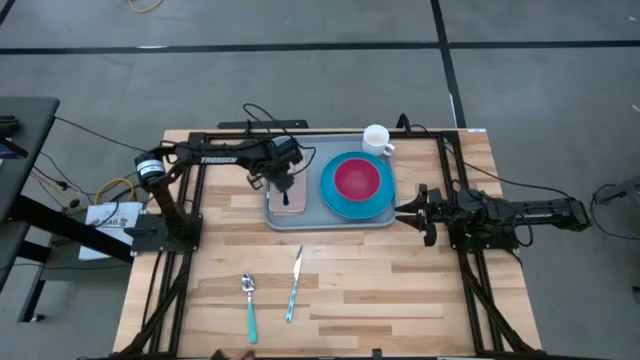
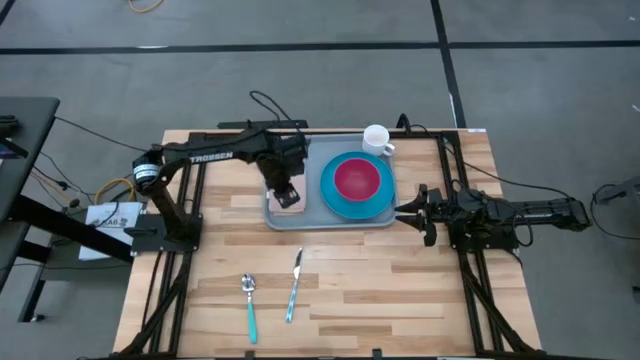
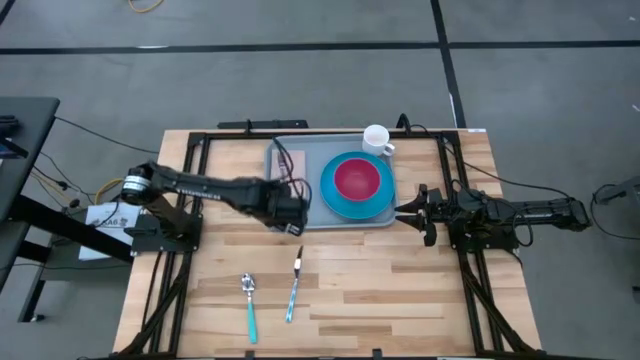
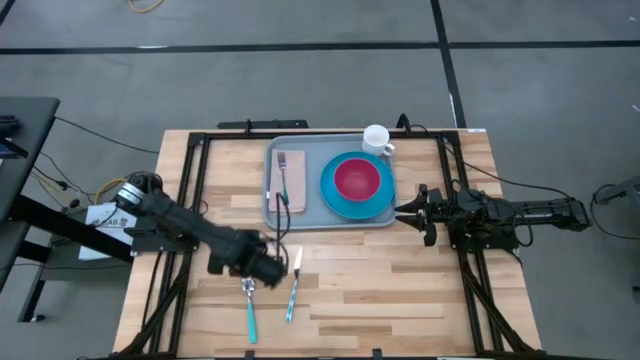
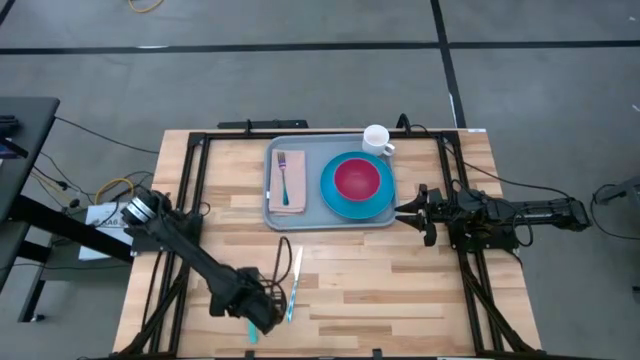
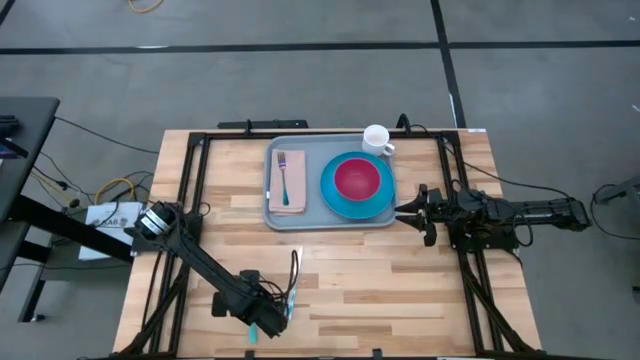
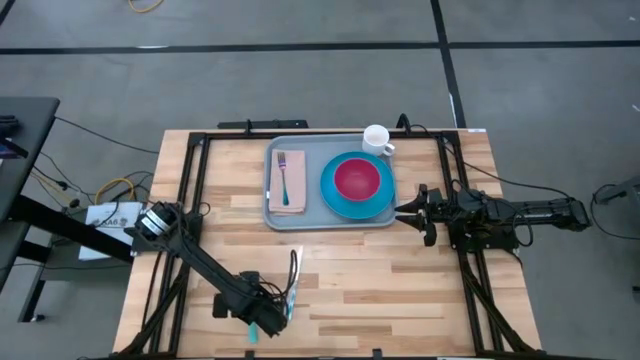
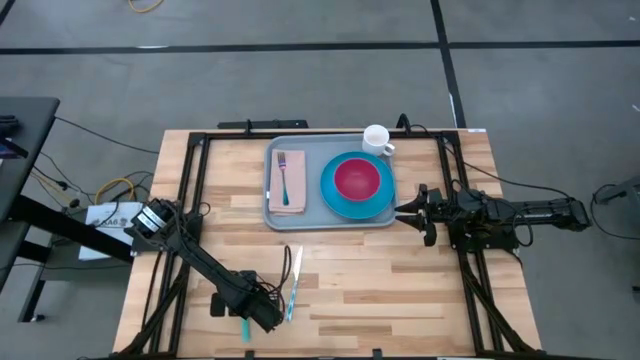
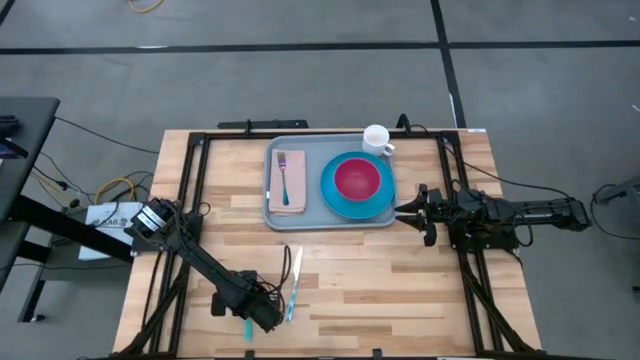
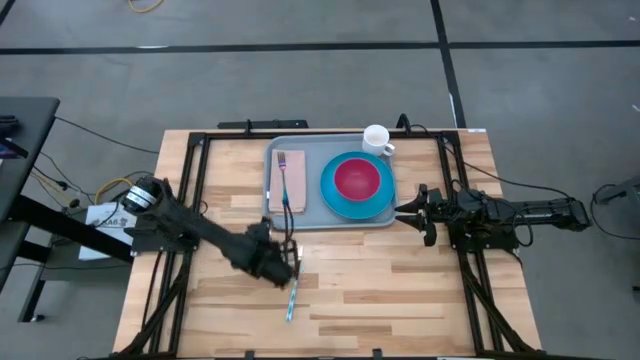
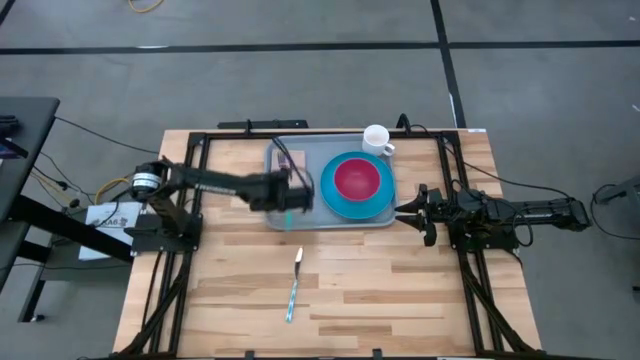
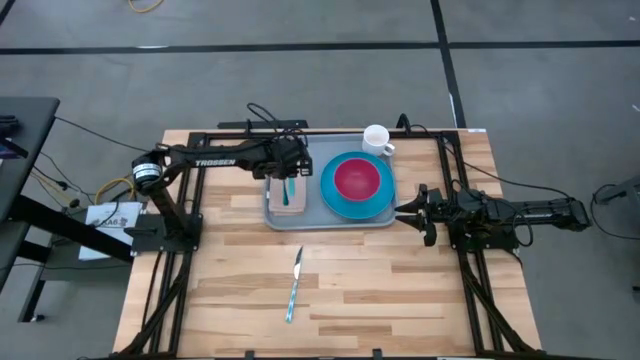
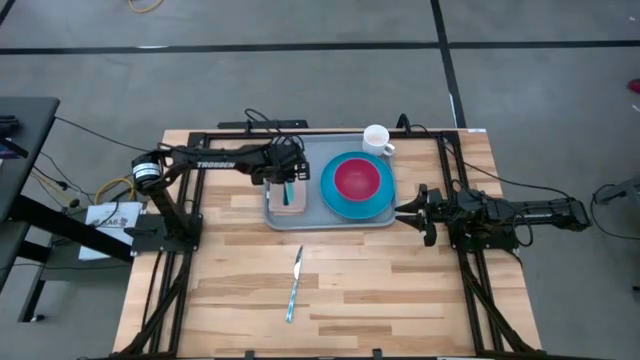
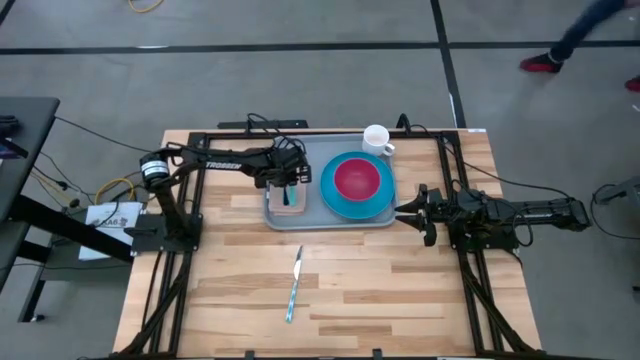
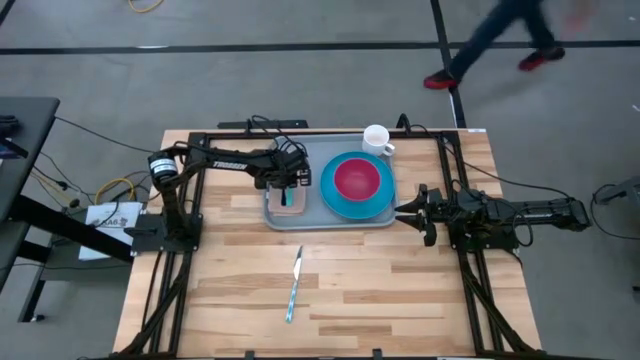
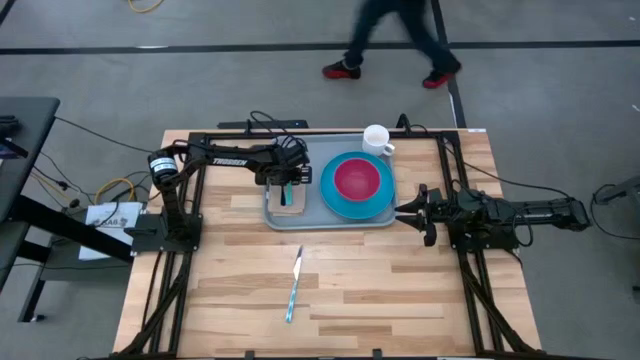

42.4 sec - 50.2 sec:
Task: Set up tray
Put the light green spoon on the light brown napkin

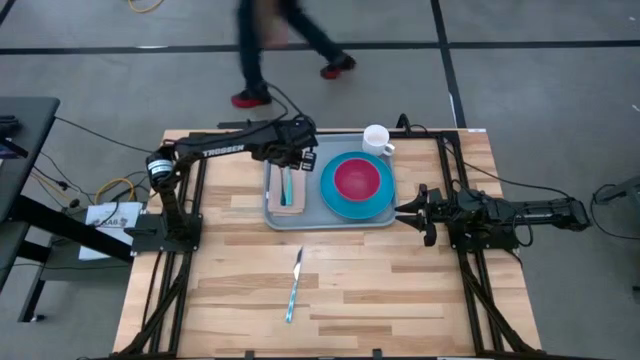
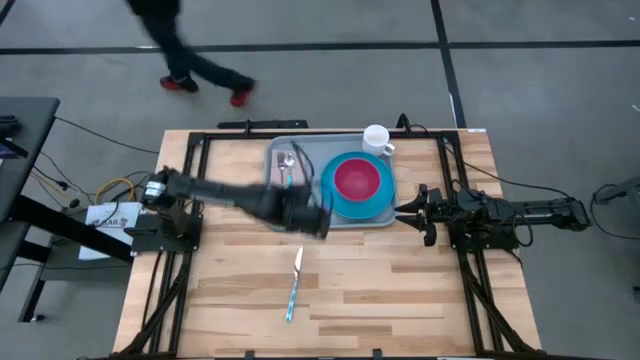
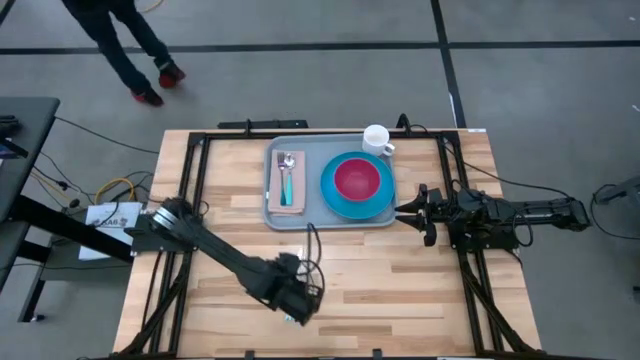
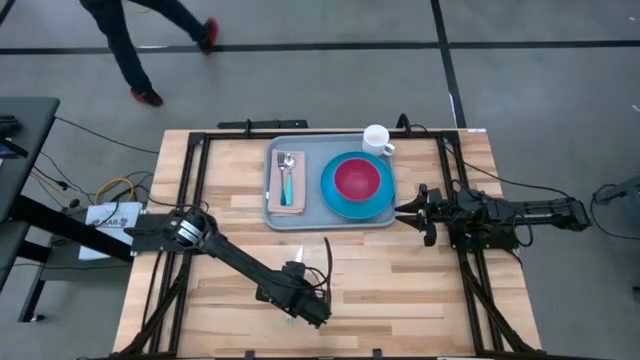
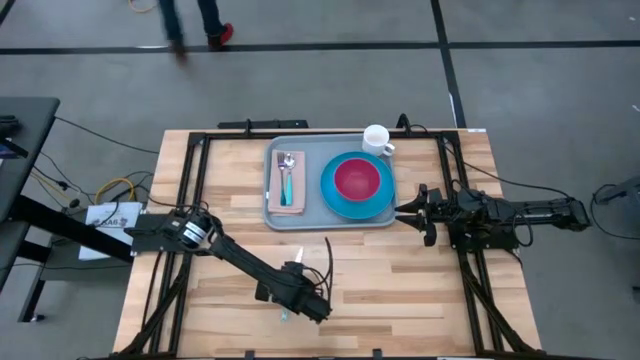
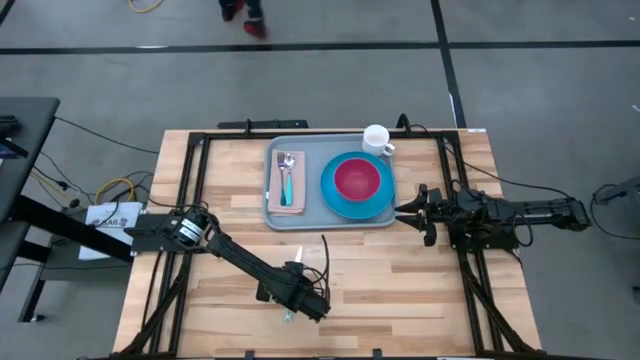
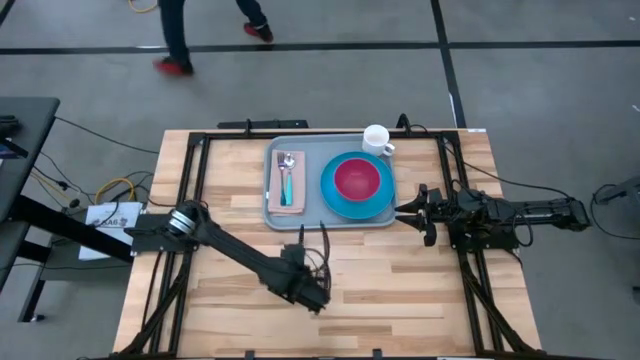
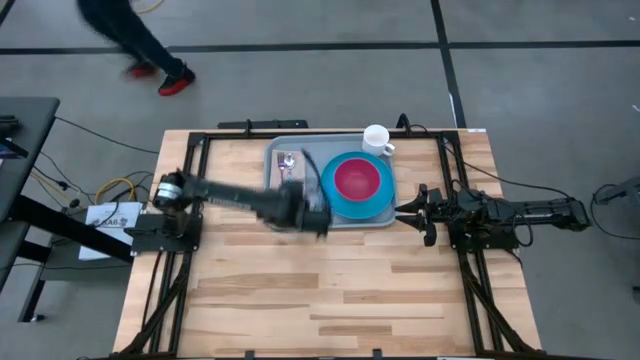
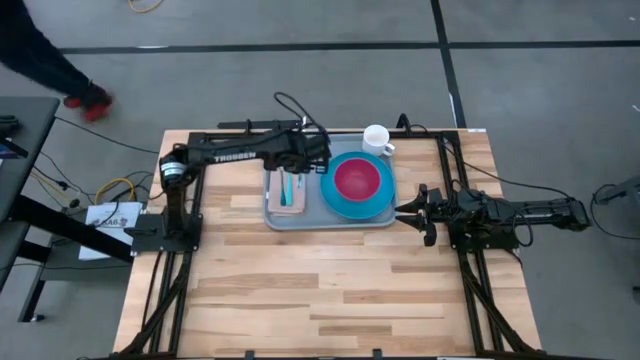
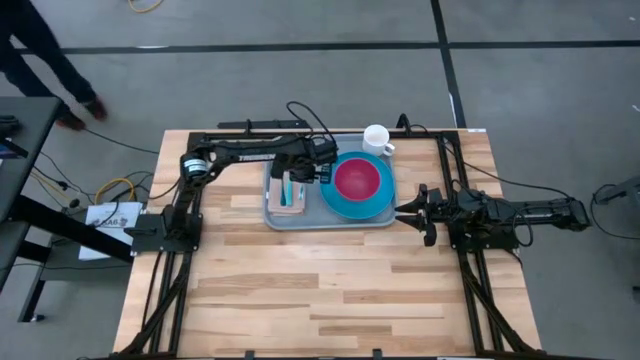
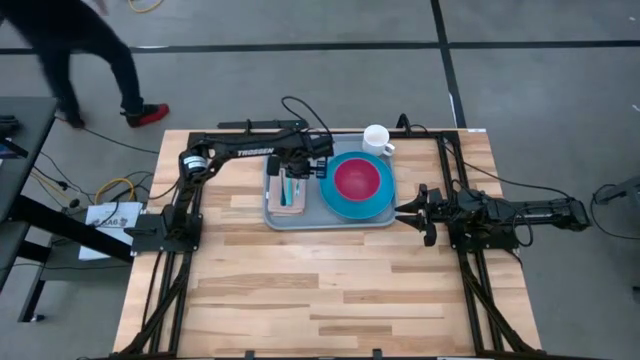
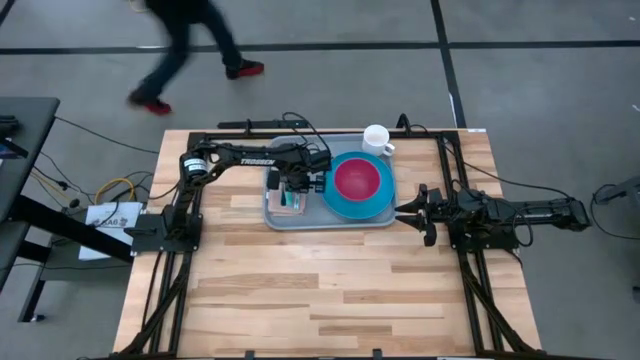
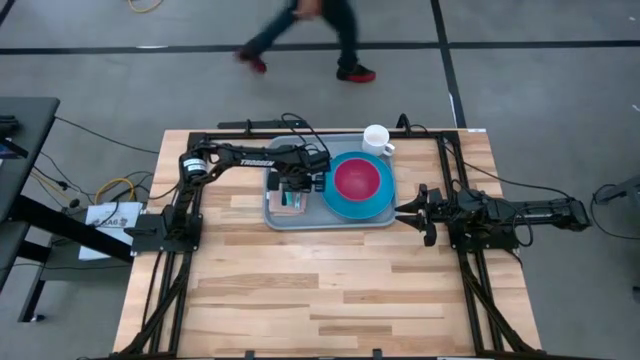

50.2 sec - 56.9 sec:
Put the green knife on the light brown napkin

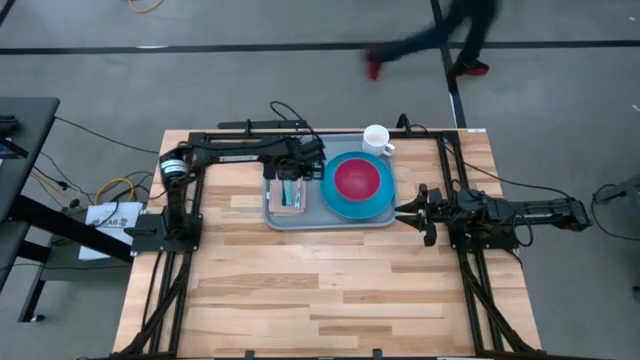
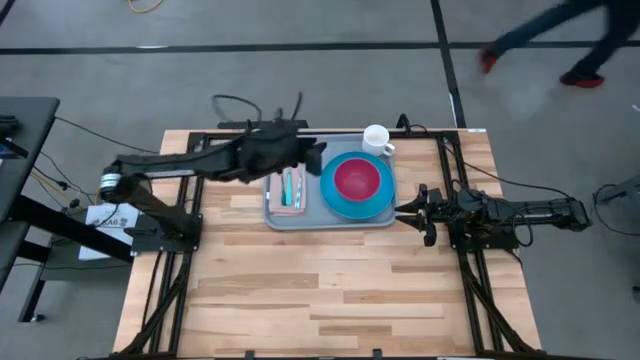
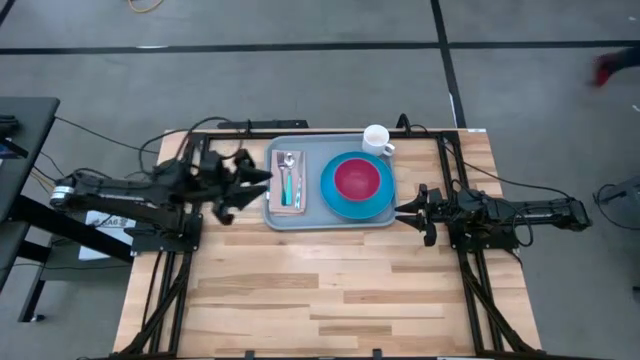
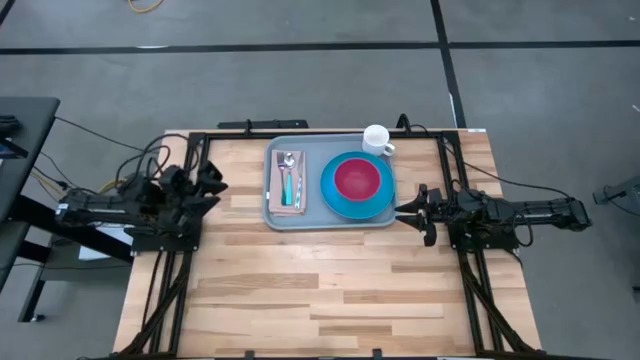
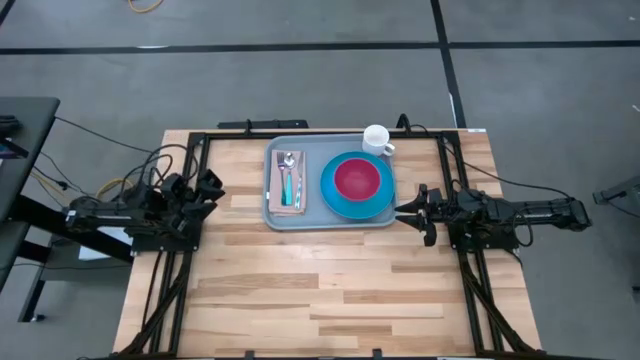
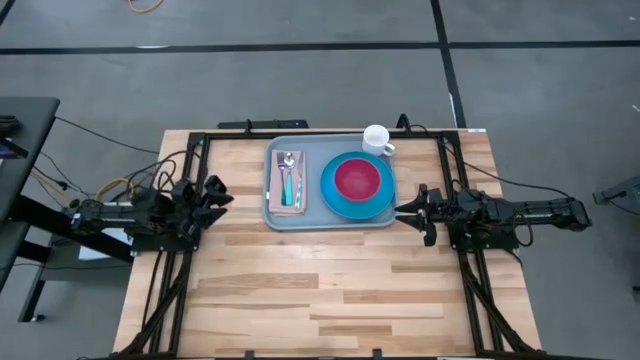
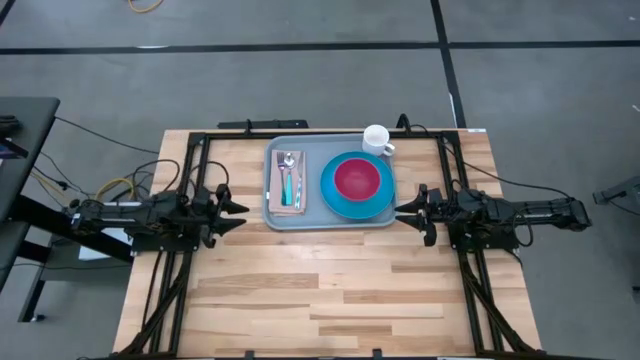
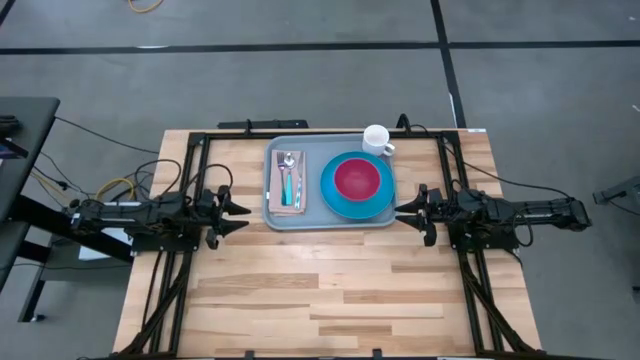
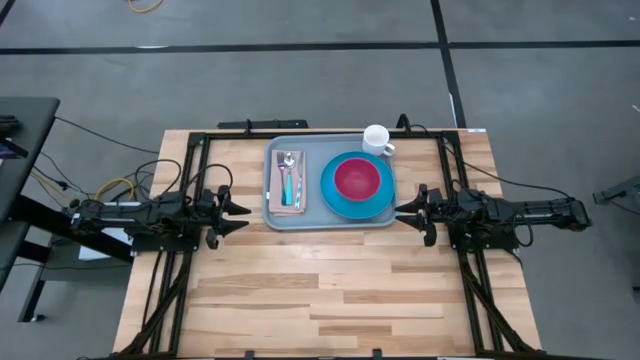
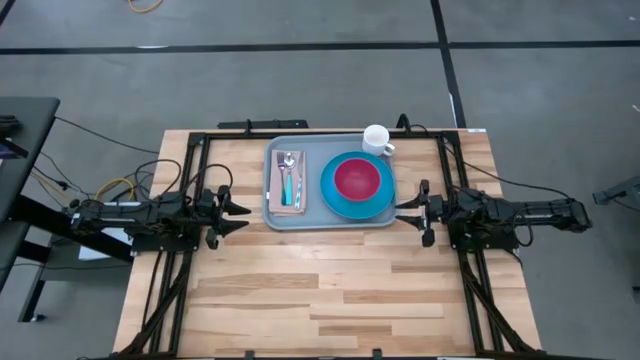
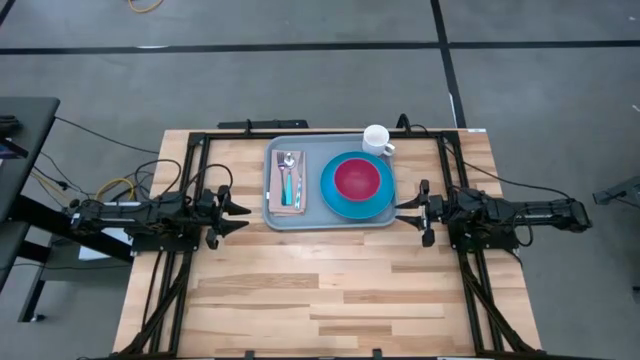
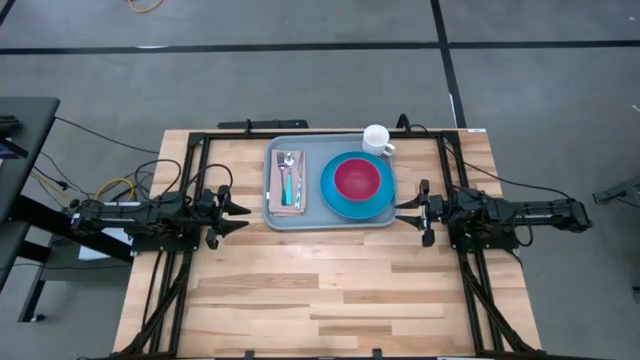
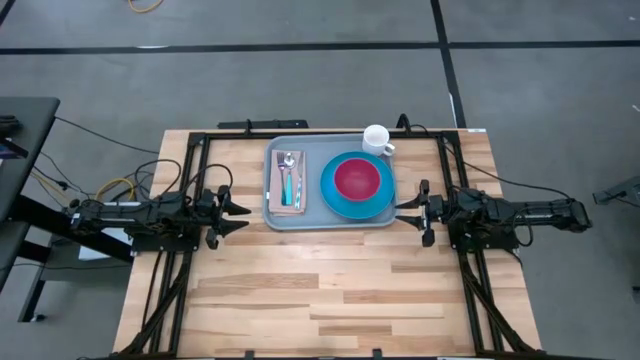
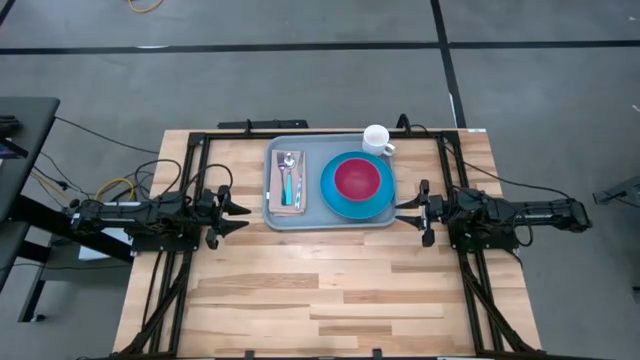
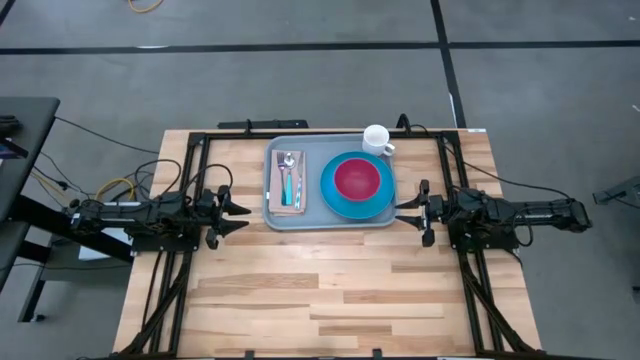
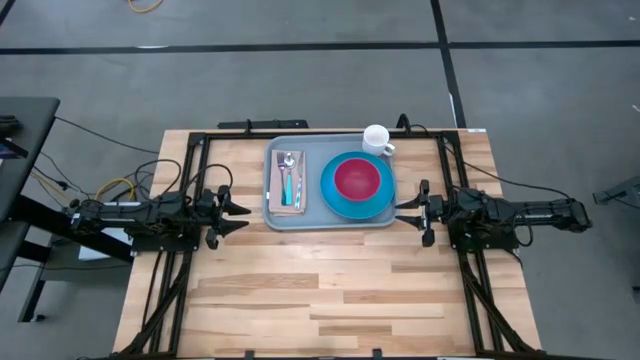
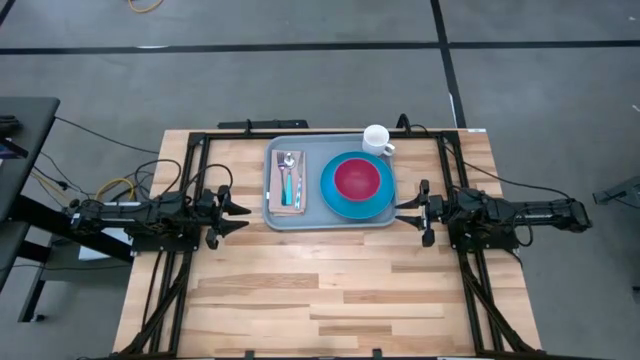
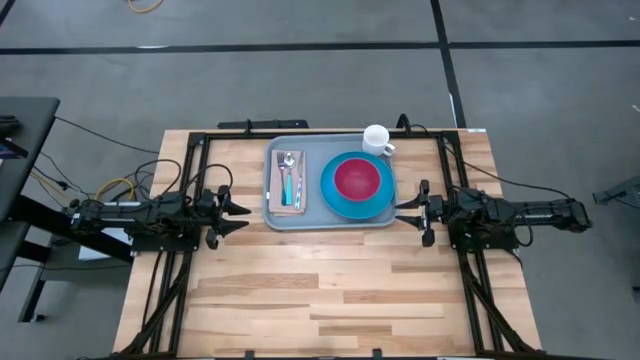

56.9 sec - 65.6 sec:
Return to Home Position
